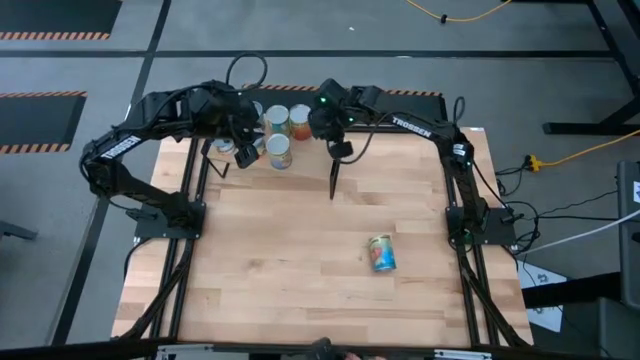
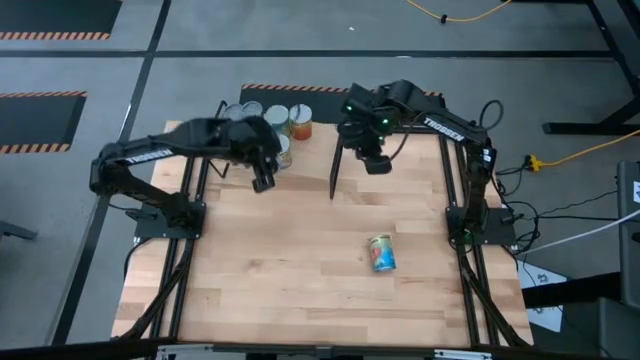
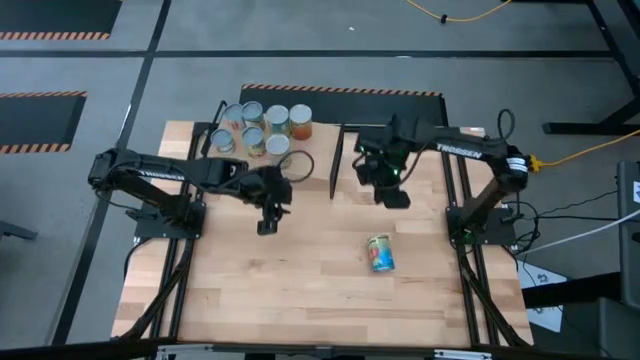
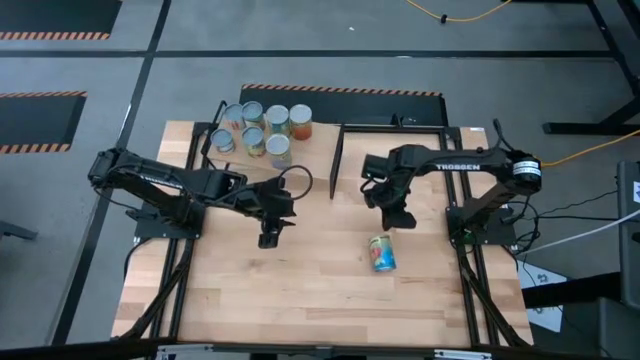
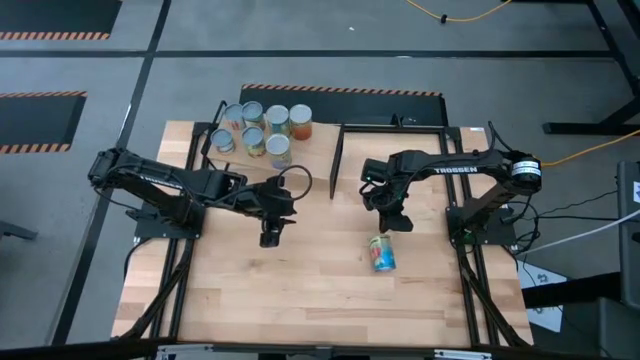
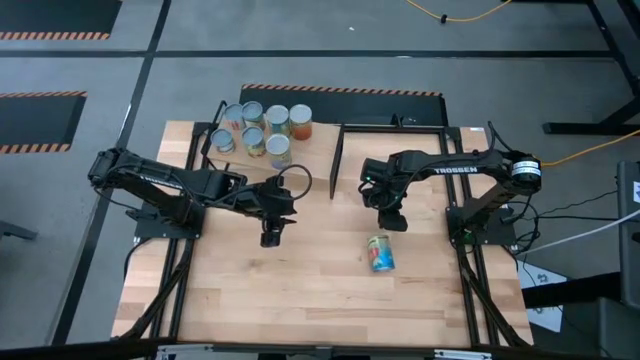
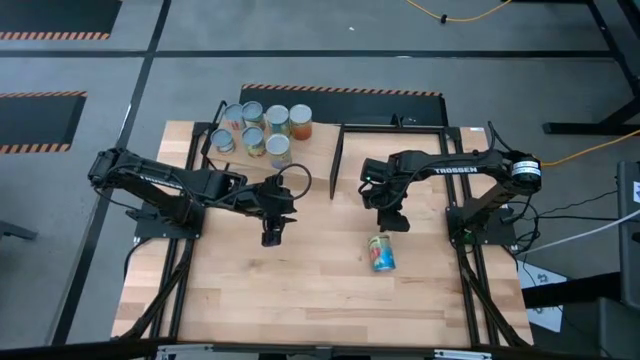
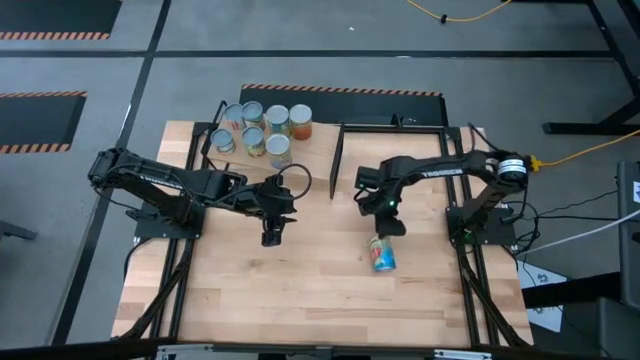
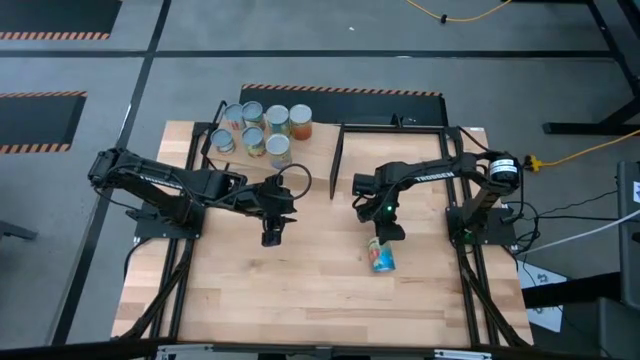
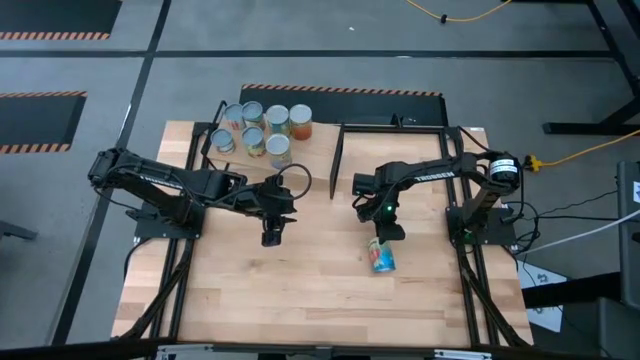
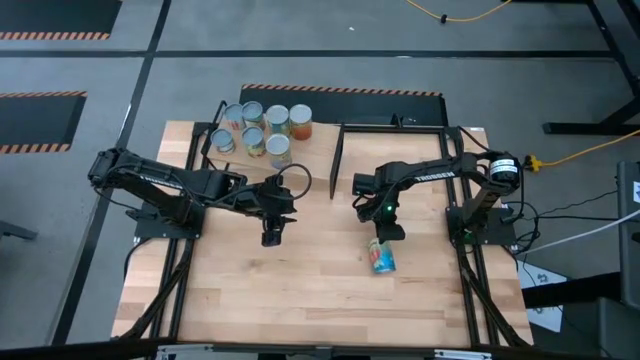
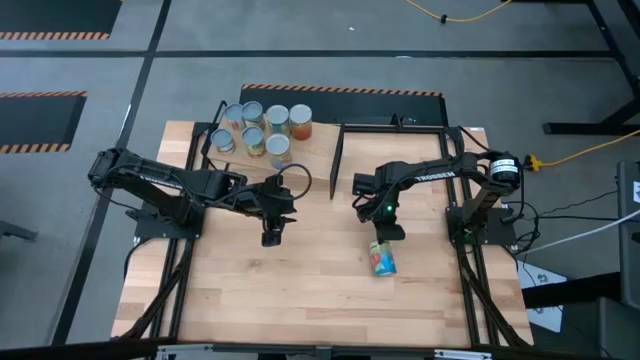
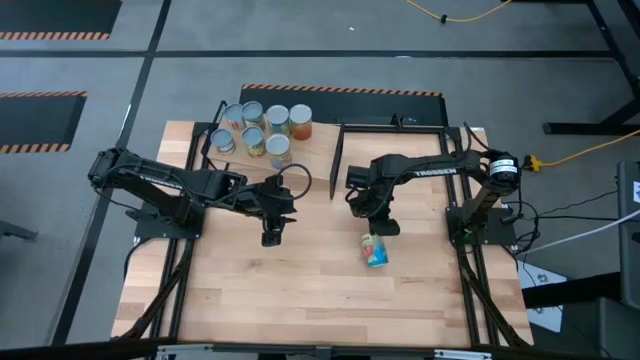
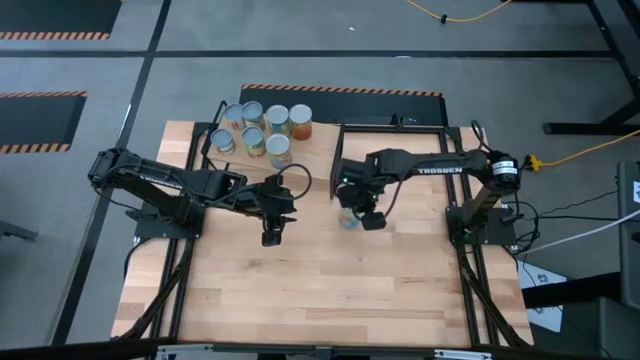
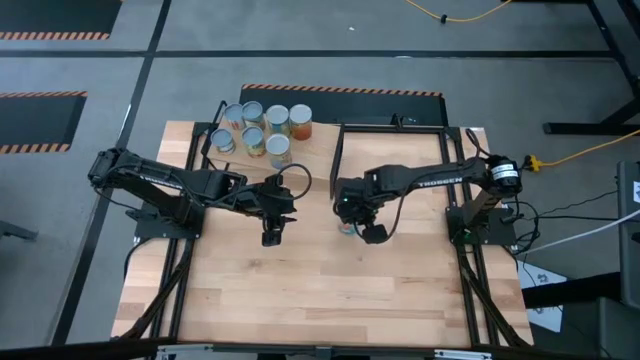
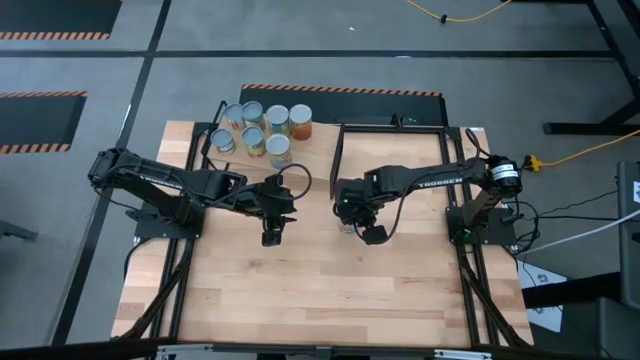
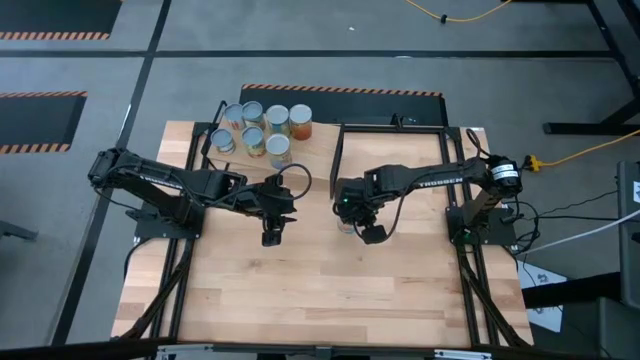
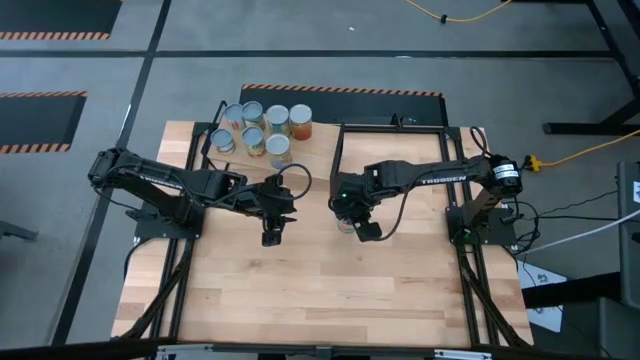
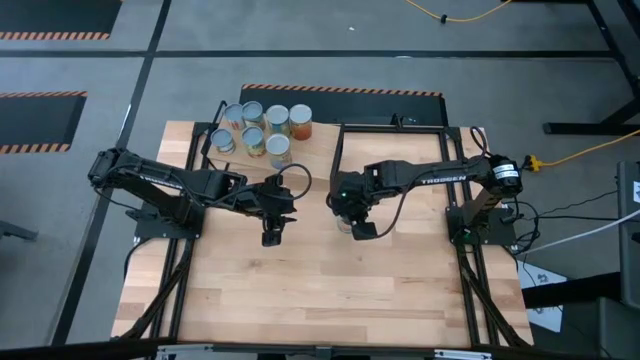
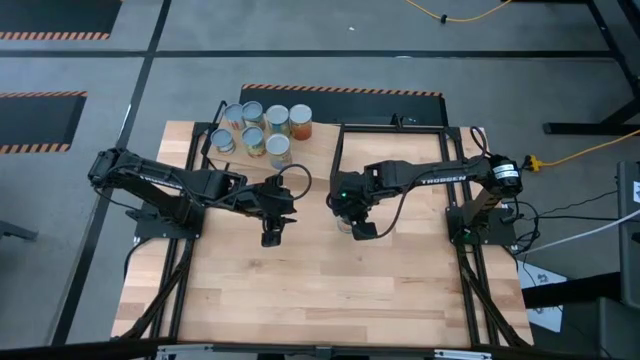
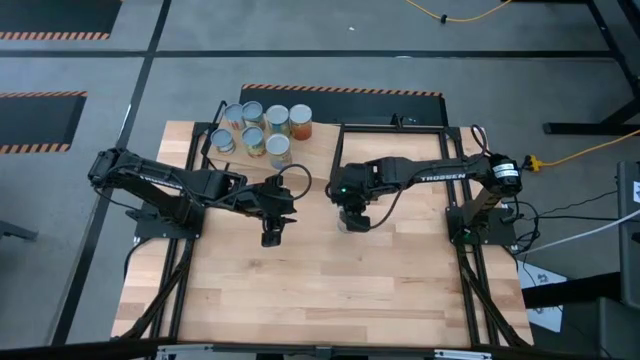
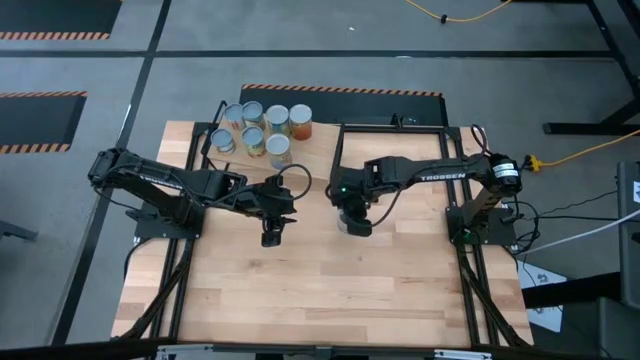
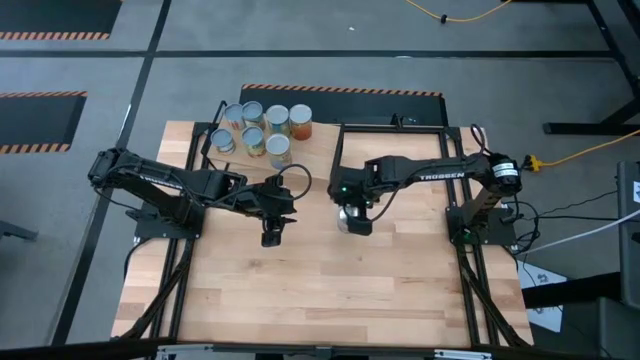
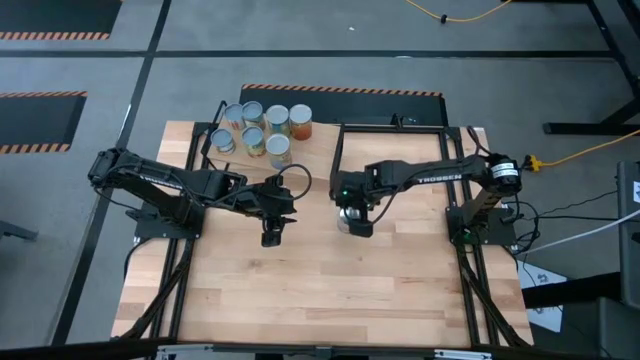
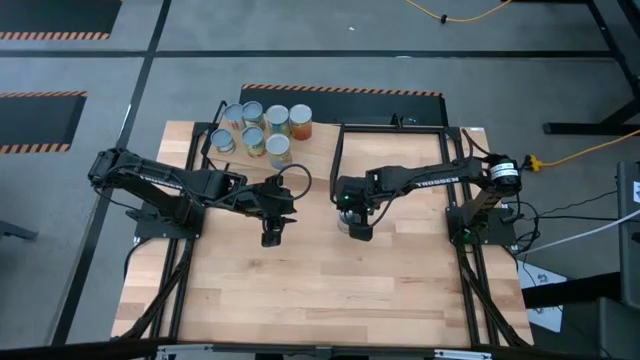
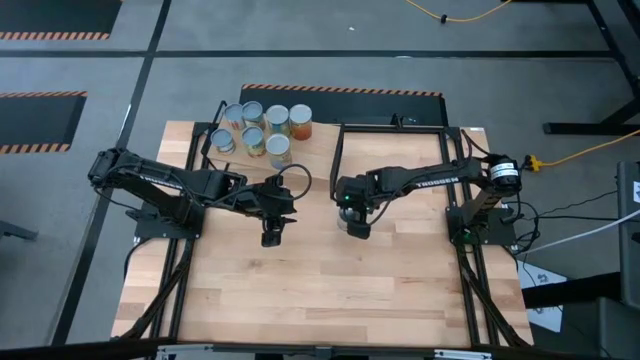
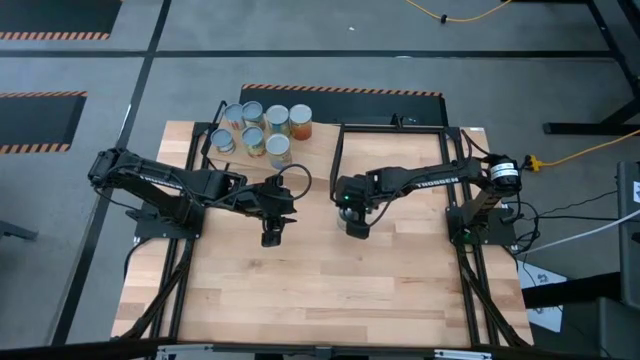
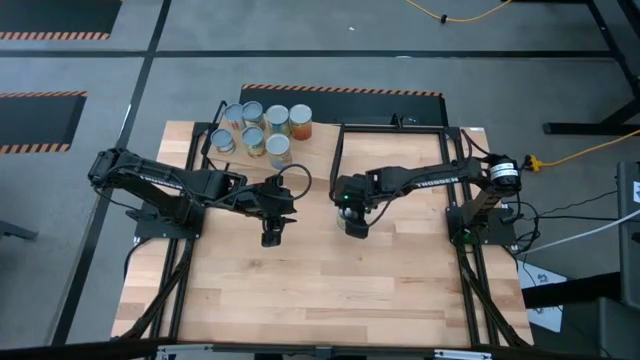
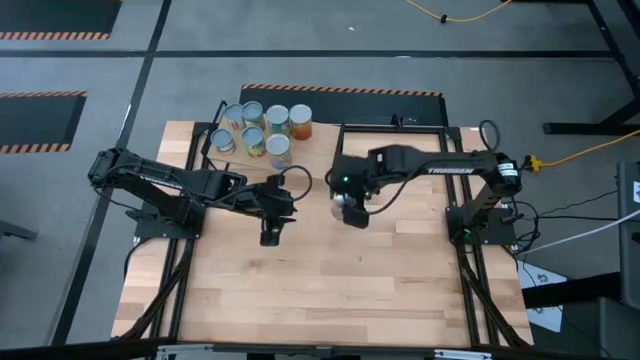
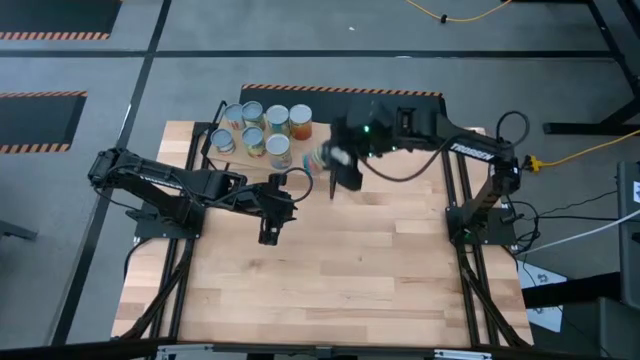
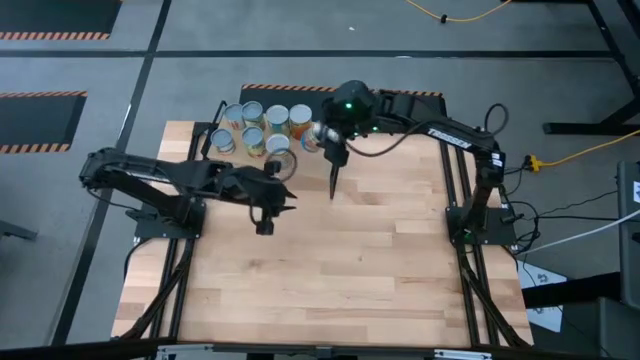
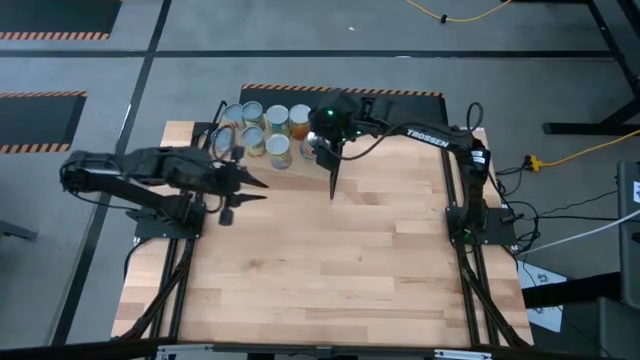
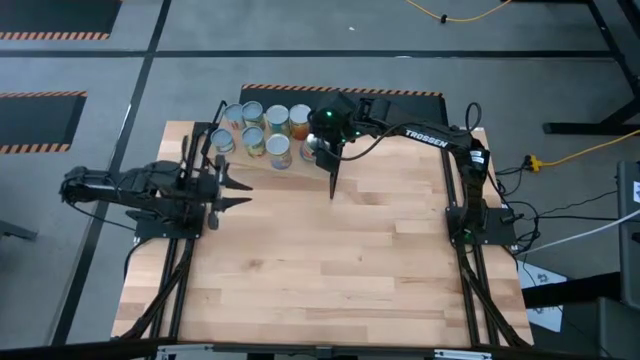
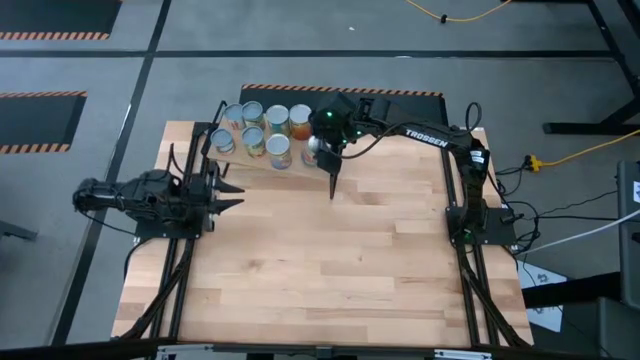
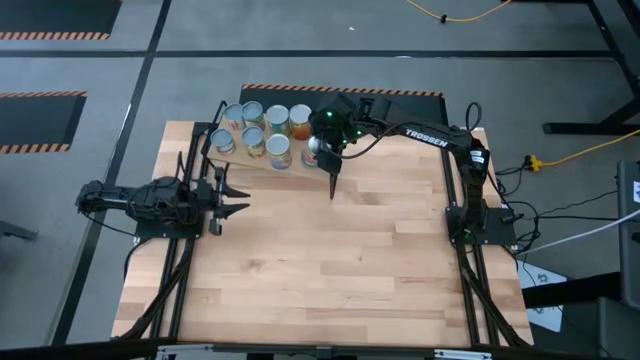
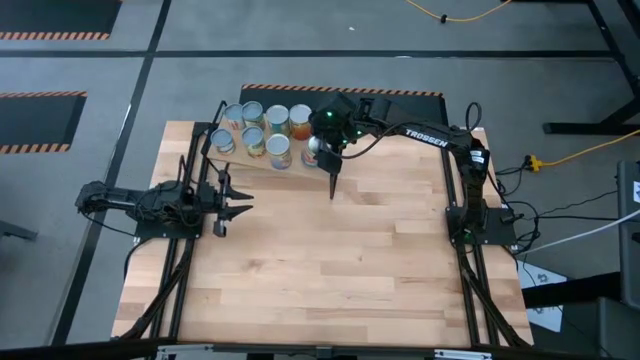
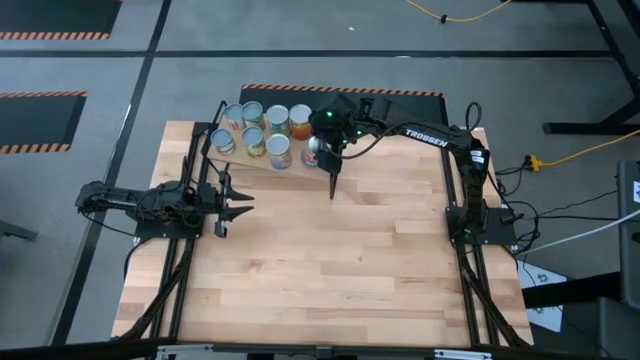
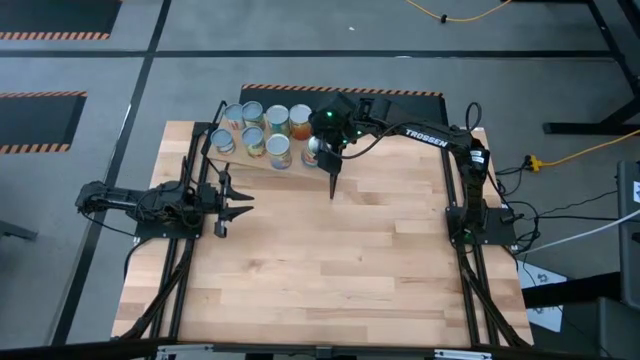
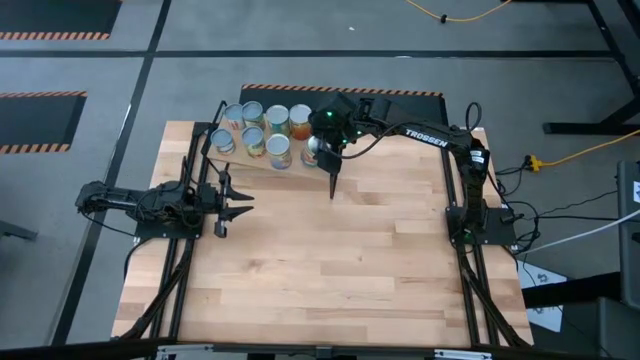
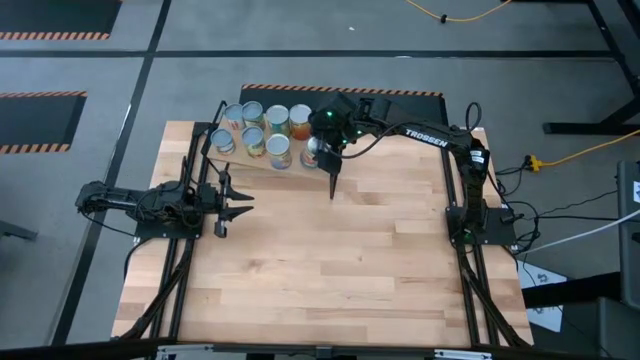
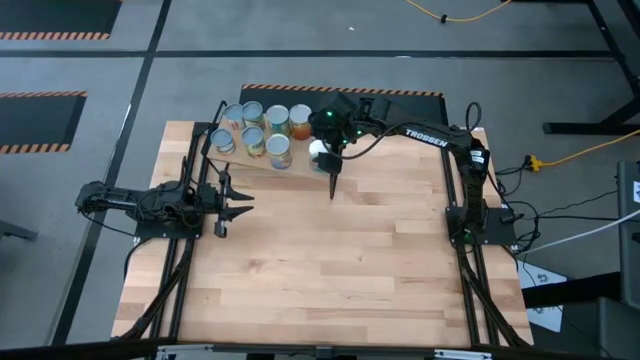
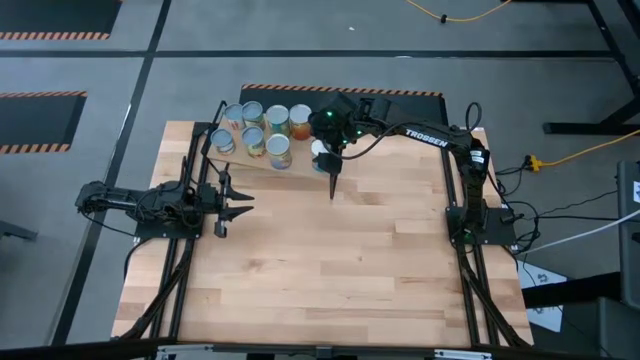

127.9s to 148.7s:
Task: Pick and place cans onto a shelf
Put the canned tomatoes on the shelf
